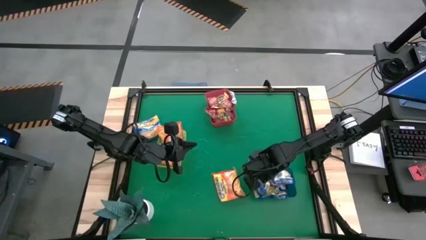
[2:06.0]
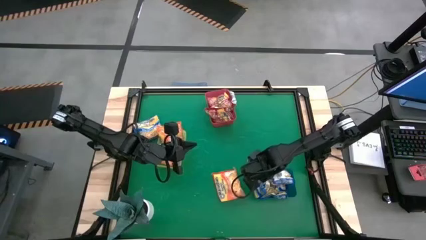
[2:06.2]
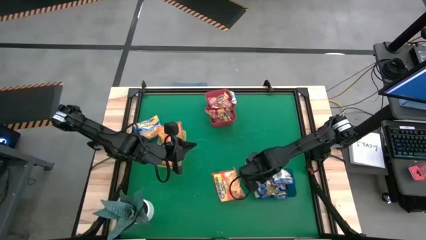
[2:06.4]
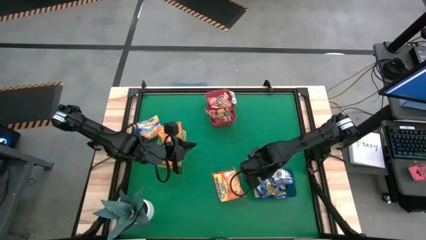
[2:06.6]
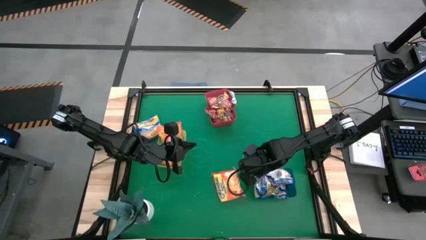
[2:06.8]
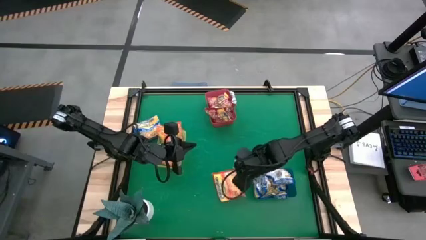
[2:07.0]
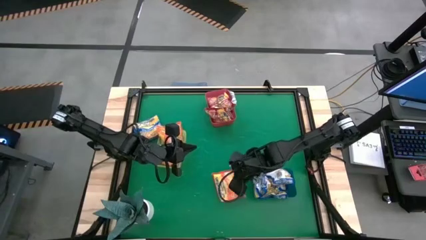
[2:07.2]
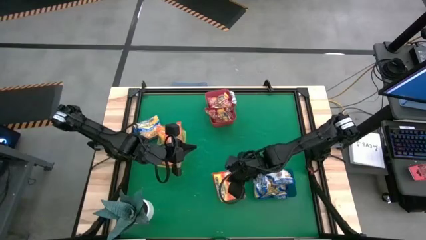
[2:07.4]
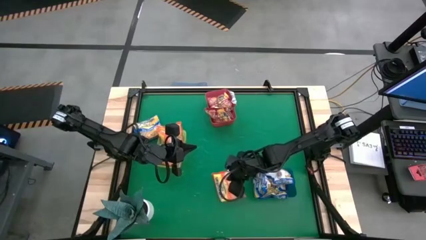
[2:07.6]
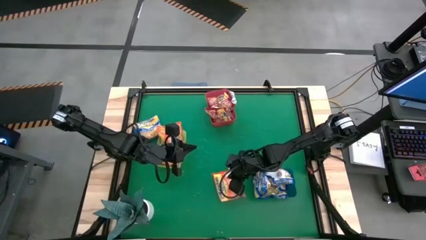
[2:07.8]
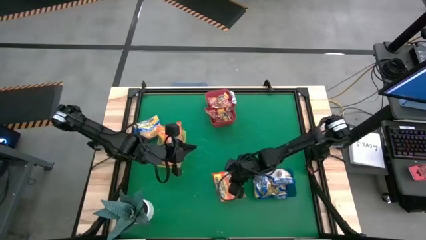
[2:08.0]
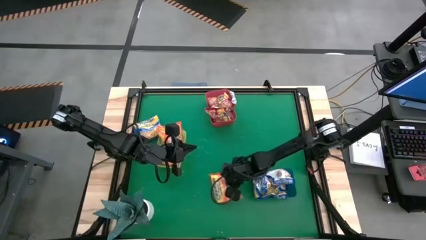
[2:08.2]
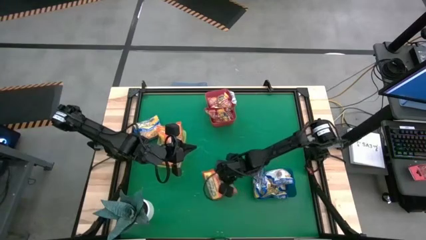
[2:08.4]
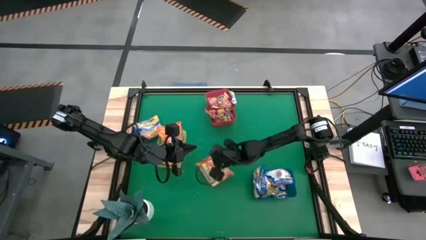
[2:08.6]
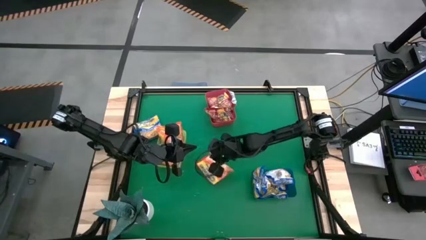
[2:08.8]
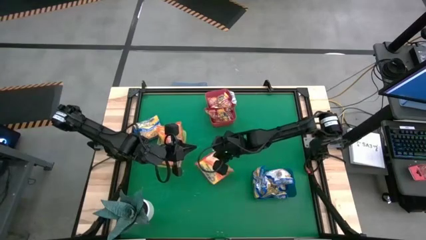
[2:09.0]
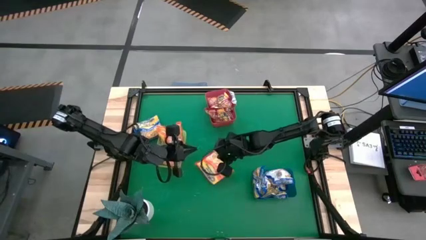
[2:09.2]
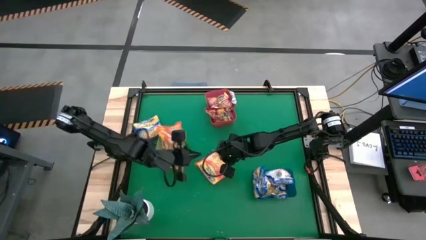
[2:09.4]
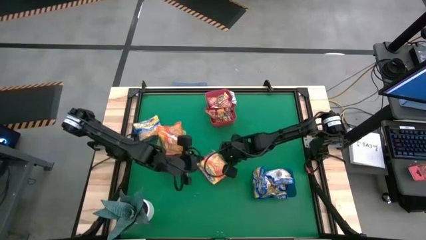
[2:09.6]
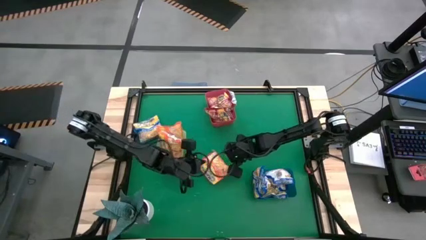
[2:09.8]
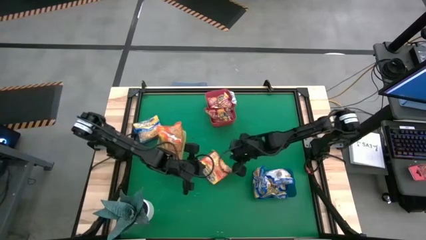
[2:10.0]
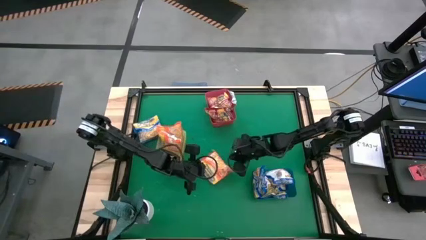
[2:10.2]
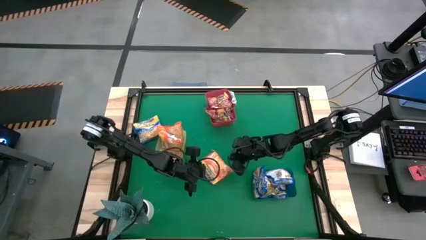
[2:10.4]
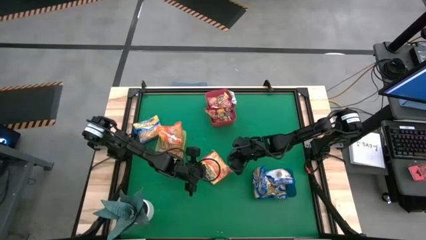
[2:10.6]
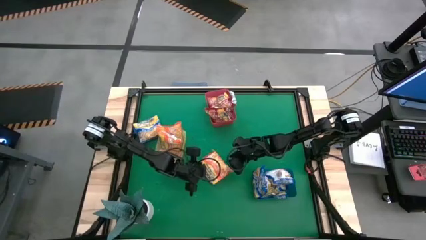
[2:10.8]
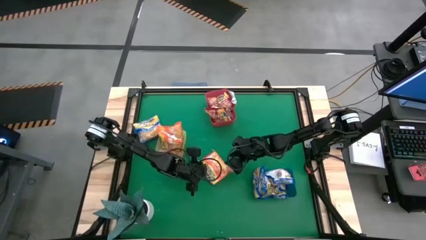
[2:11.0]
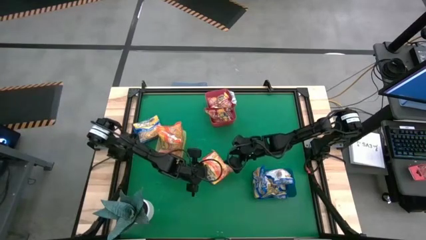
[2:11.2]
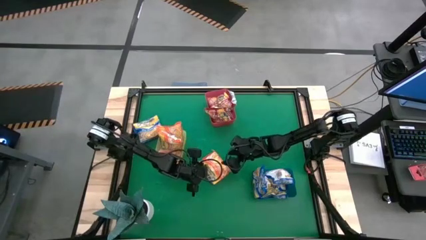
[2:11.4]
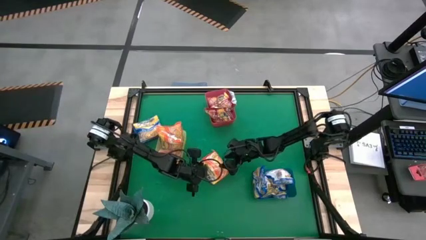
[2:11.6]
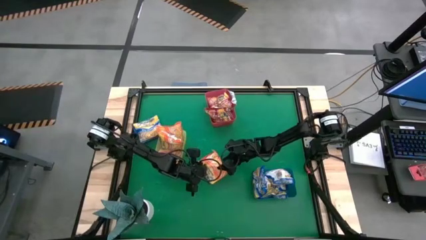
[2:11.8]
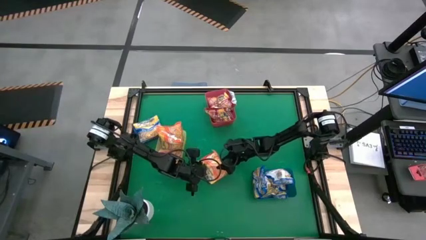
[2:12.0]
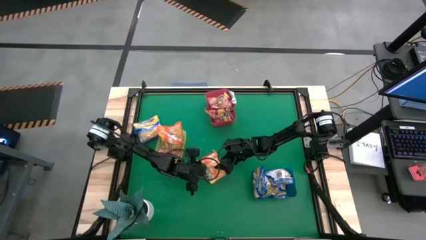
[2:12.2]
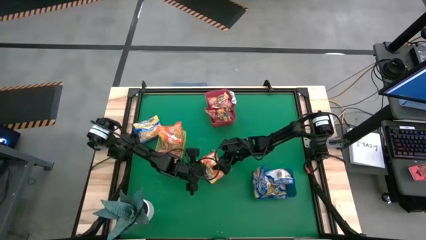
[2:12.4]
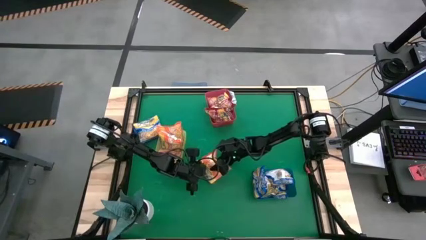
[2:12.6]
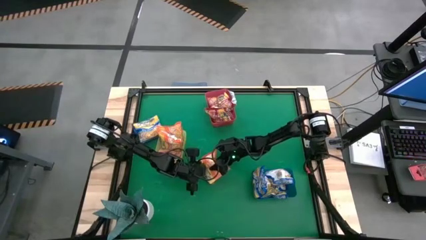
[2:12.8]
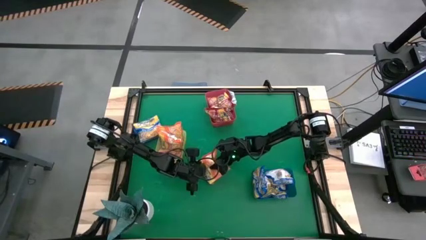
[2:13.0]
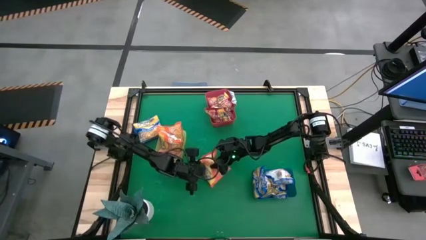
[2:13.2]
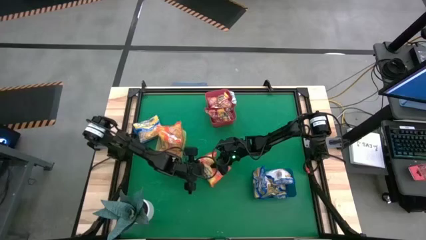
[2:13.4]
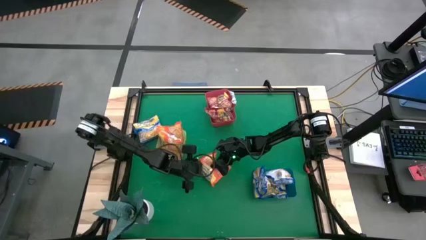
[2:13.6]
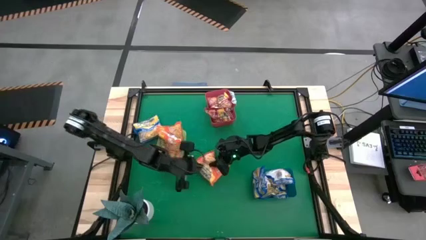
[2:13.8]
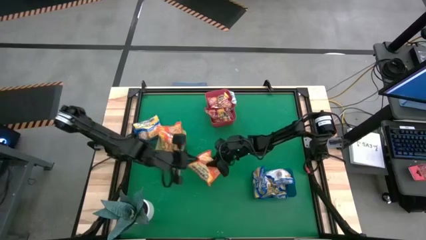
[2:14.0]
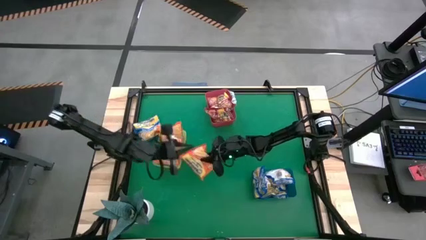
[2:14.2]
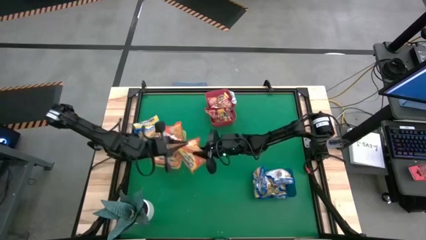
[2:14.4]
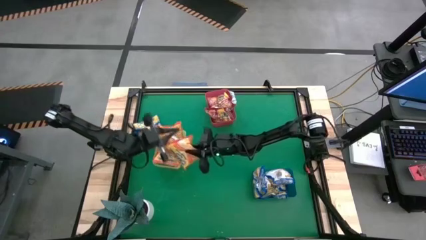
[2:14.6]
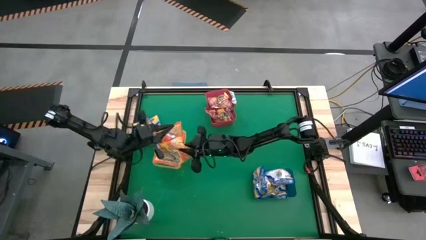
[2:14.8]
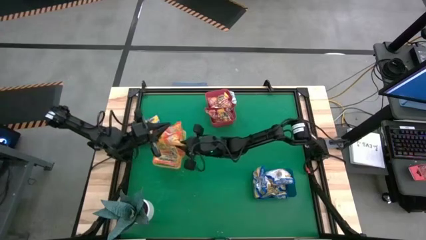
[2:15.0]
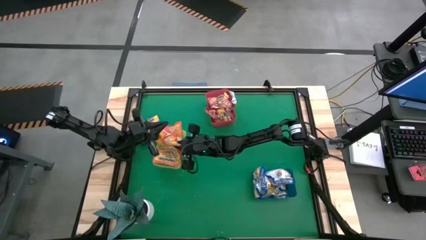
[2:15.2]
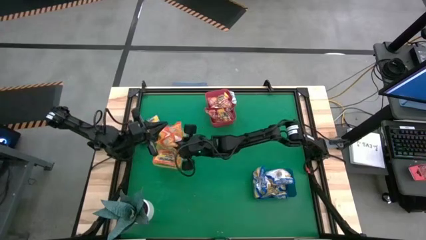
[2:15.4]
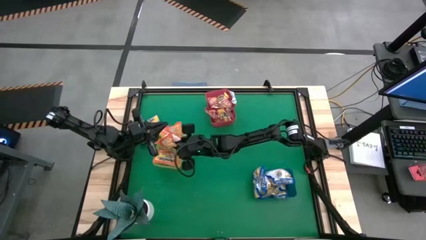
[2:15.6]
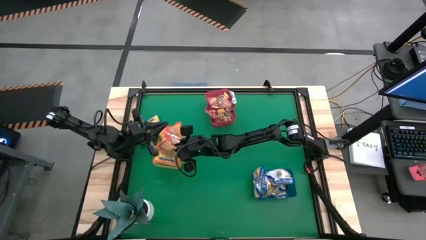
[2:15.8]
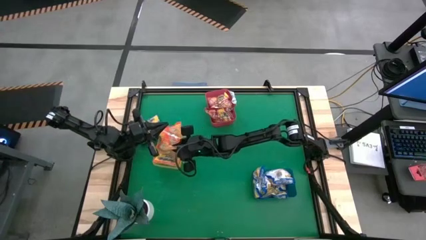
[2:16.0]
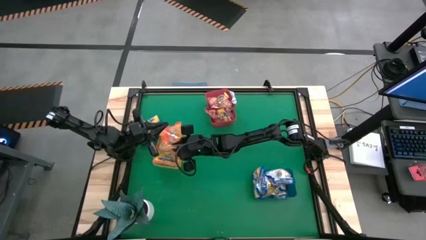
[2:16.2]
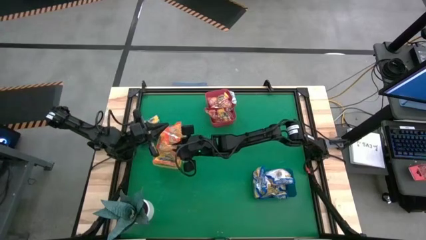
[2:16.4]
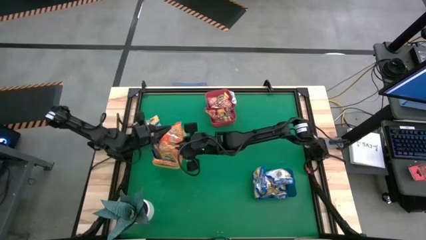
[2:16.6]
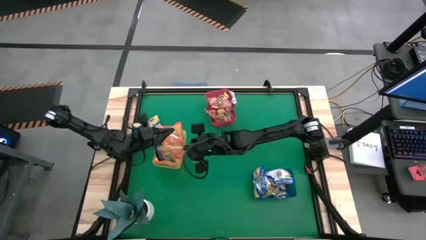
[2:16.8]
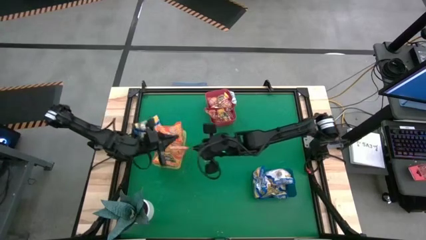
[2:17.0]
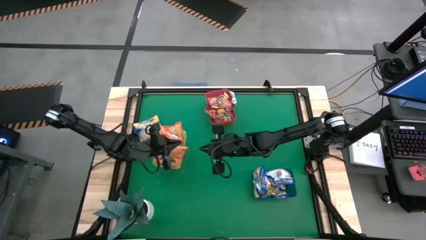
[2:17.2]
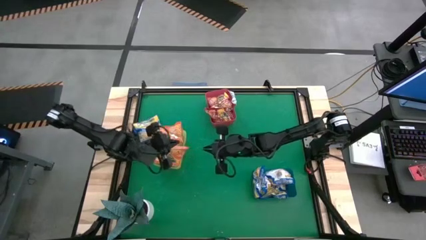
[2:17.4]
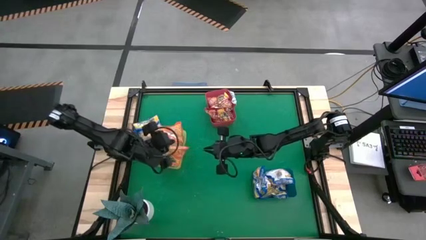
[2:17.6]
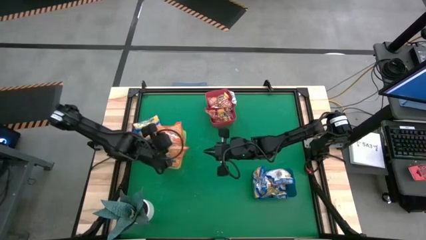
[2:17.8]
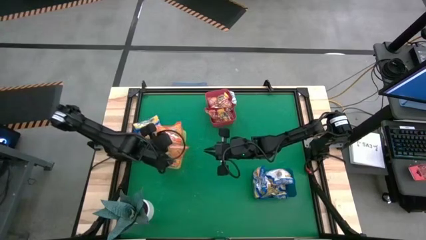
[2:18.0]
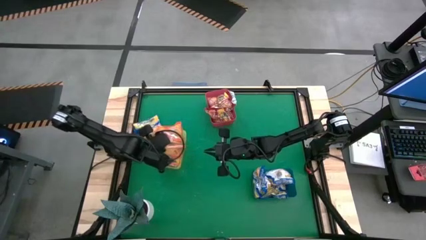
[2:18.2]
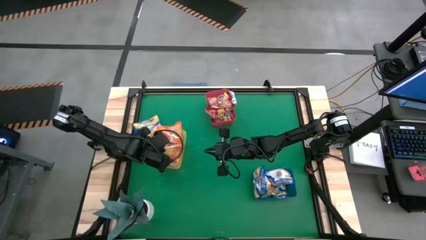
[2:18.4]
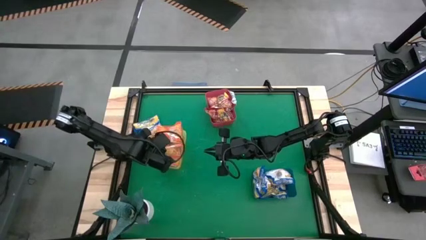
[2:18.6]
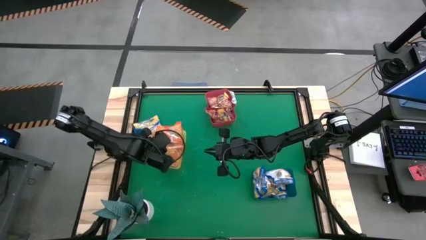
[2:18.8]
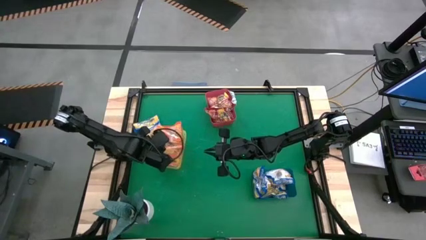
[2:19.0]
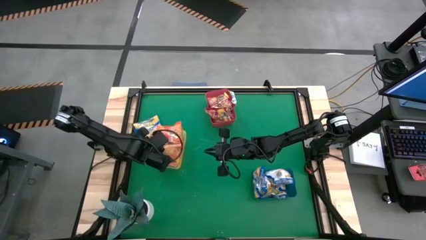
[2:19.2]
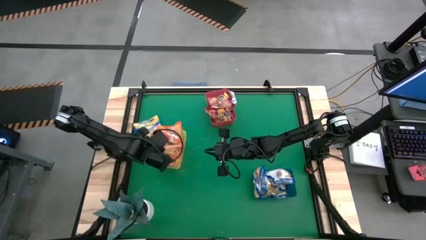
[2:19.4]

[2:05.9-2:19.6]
Task: Sort Maruchan noodles
Put the noodle pack into the yellow bin

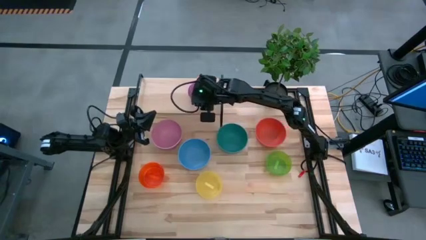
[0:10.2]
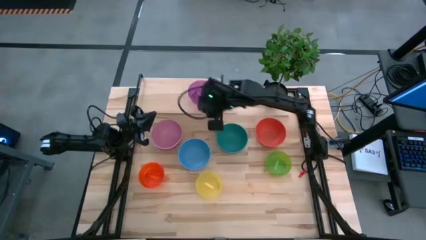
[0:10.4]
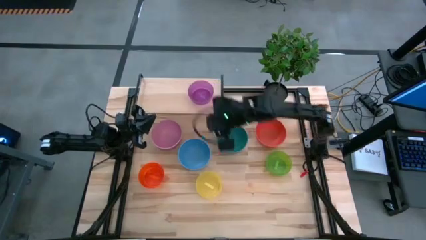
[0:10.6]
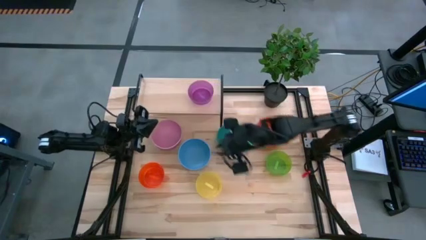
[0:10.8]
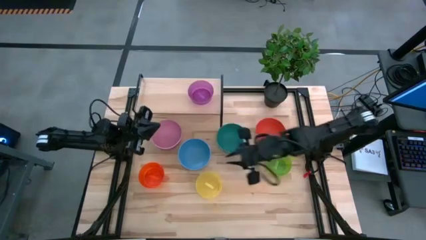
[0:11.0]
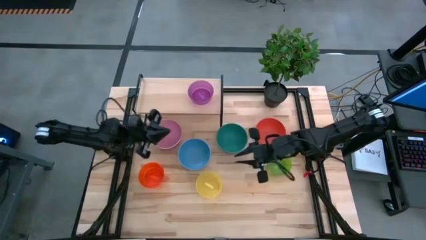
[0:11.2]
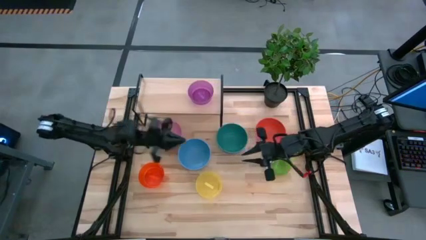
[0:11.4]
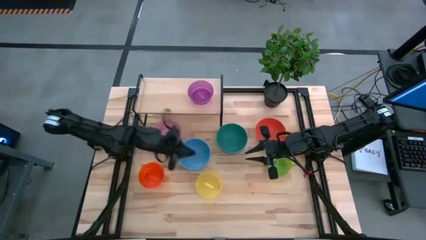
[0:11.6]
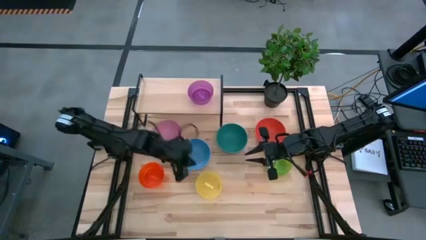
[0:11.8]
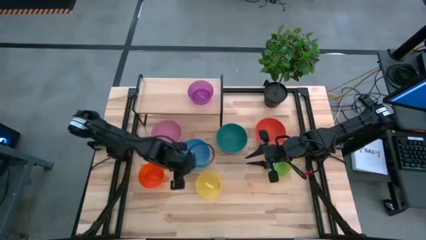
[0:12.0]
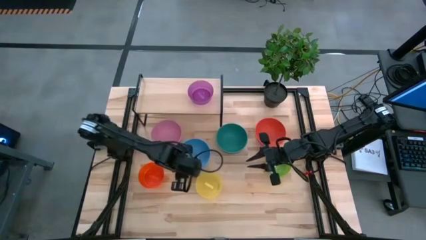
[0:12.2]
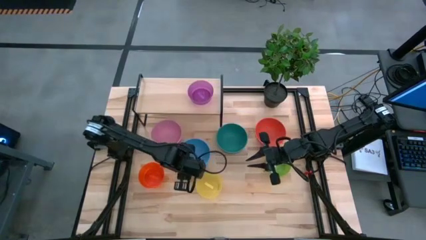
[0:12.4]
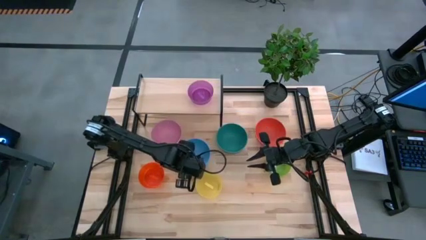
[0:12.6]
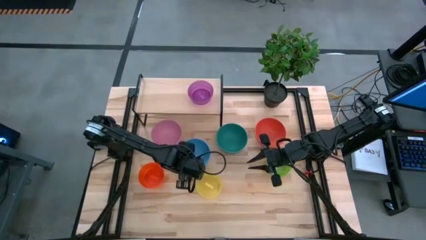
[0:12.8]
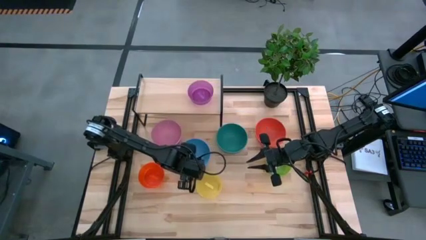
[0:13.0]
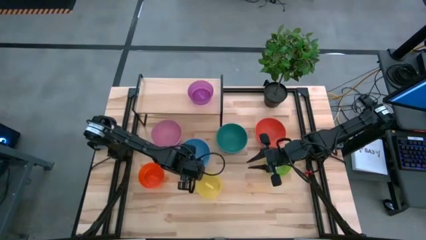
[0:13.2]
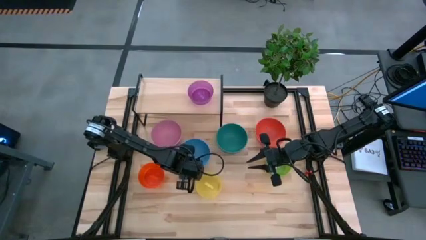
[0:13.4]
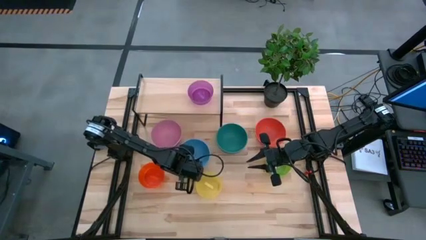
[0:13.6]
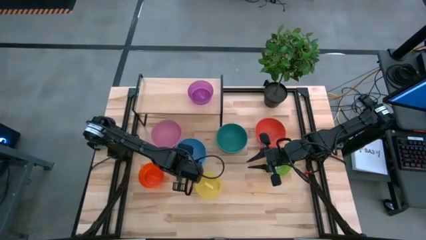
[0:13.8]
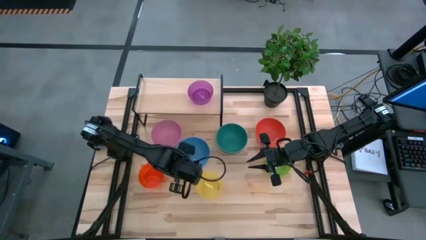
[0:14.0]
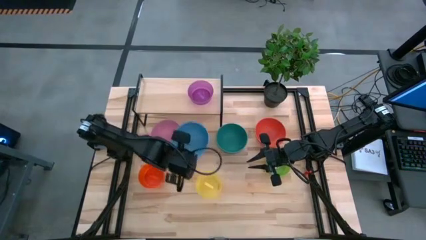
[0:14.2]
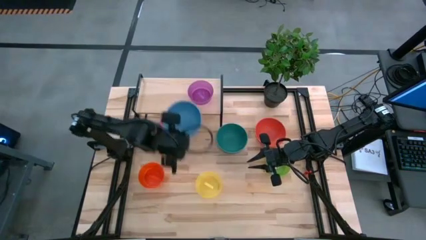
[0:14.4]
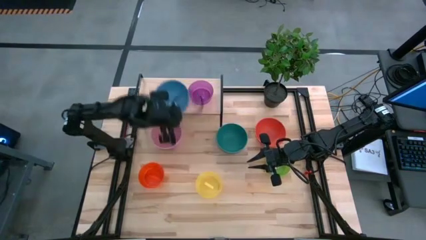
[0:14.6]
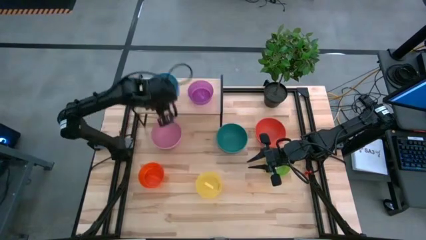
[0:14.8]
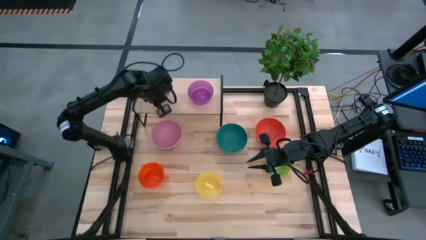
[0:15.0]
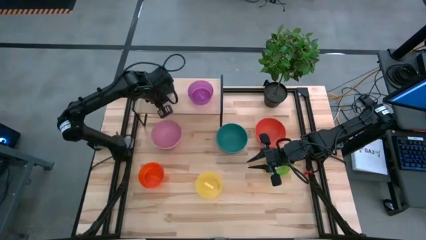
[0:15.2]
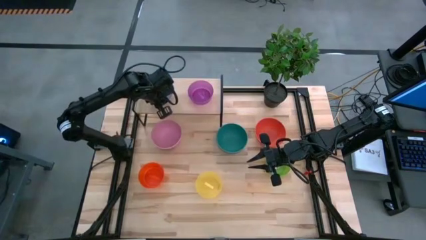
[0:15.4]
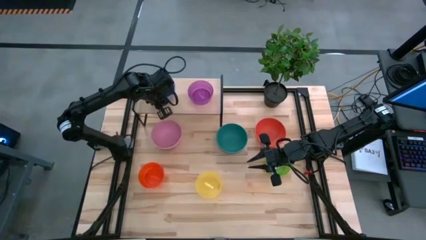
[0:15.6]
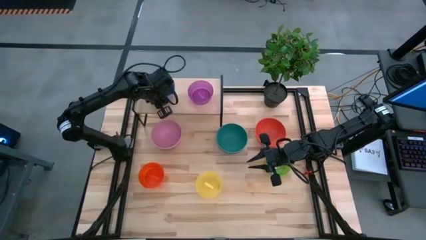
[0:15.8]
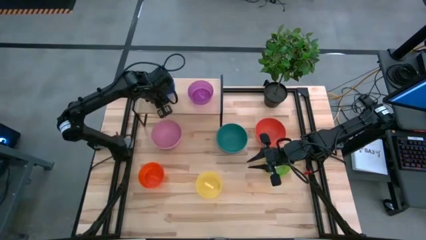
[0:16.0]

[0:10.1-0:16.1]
Task: Place and stack bowls onto a shelf
Put the blue bowl on the shelf
